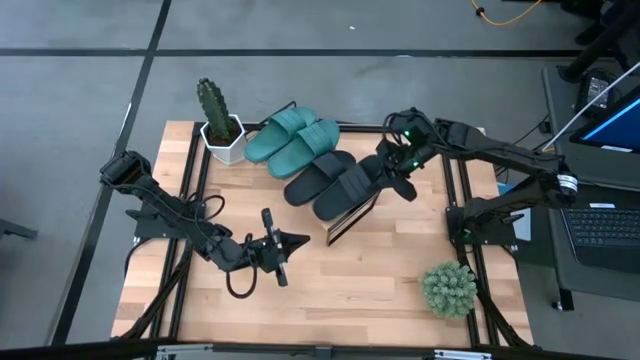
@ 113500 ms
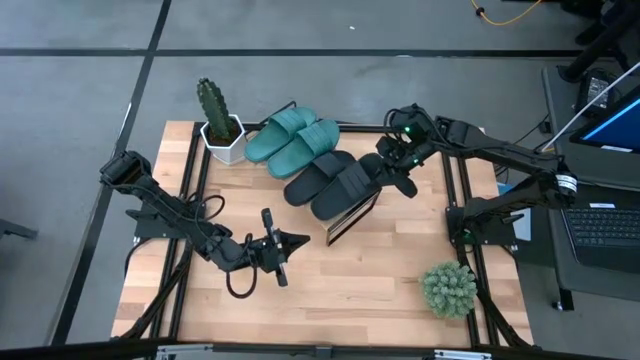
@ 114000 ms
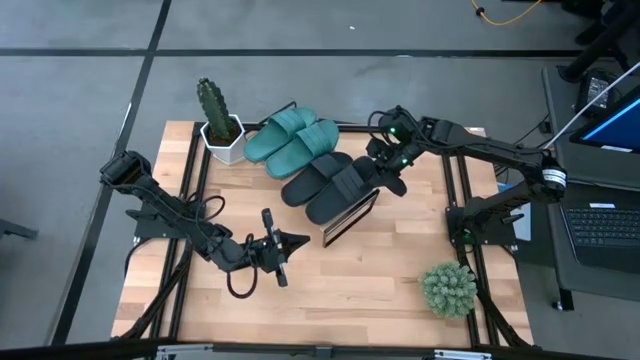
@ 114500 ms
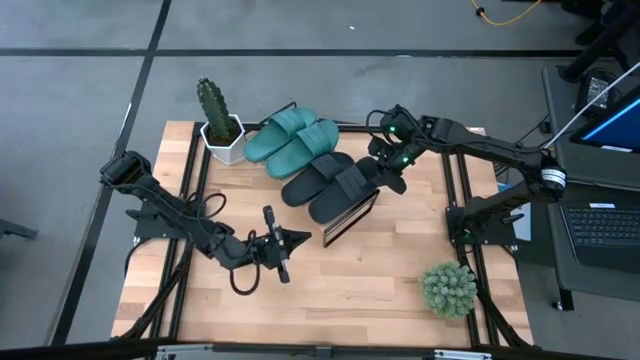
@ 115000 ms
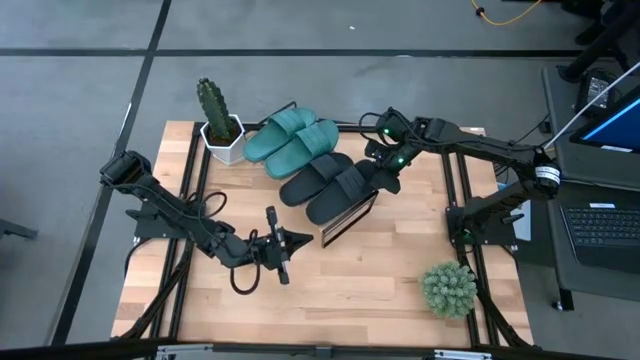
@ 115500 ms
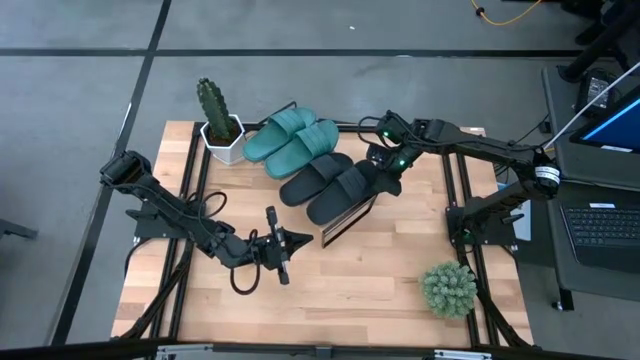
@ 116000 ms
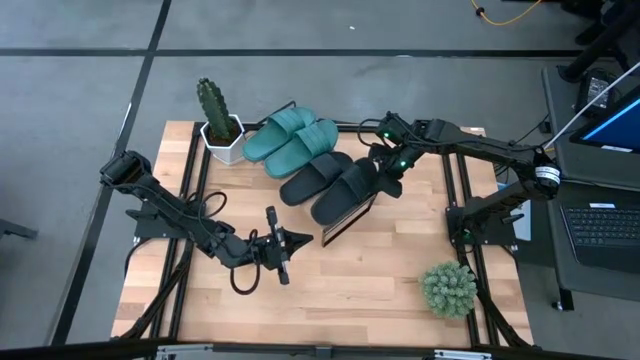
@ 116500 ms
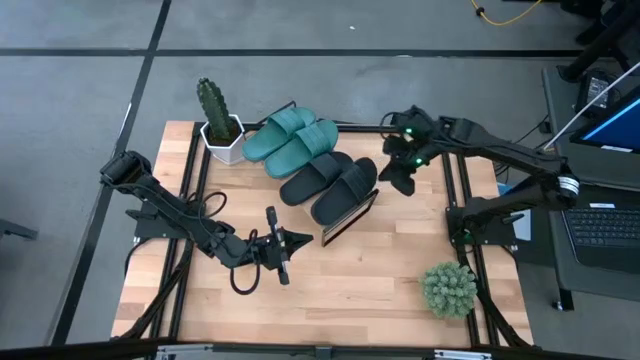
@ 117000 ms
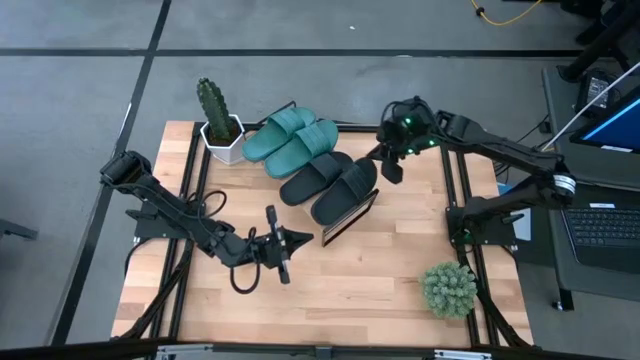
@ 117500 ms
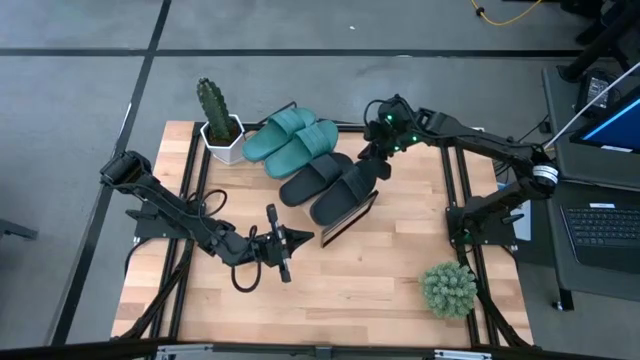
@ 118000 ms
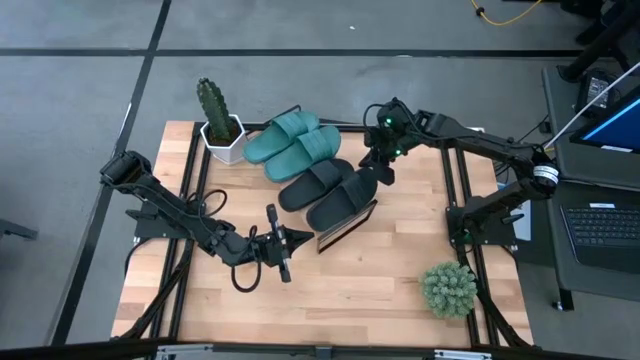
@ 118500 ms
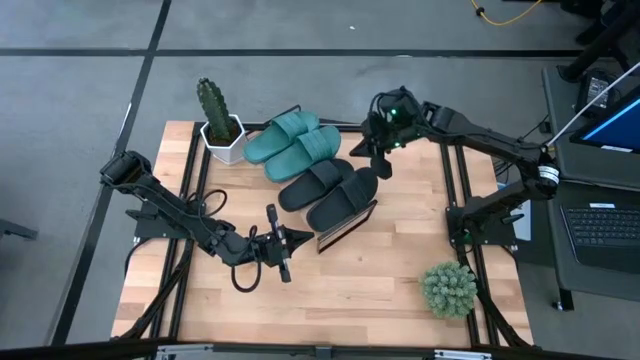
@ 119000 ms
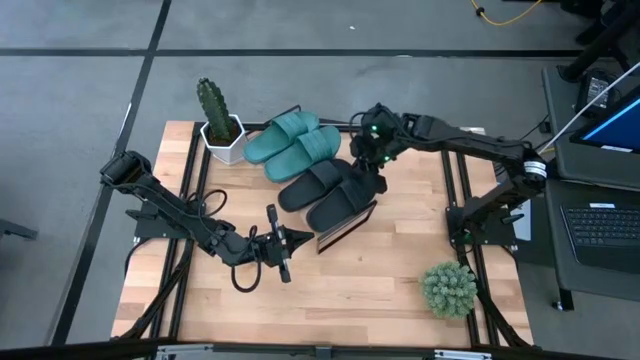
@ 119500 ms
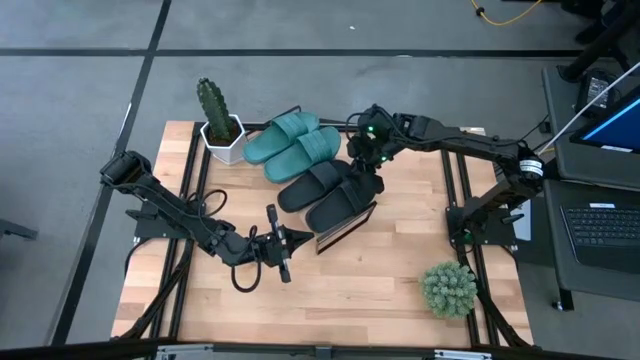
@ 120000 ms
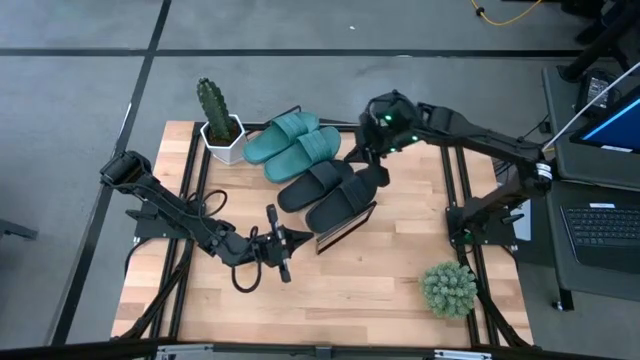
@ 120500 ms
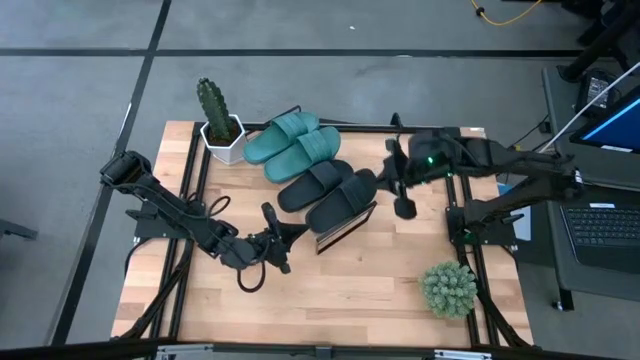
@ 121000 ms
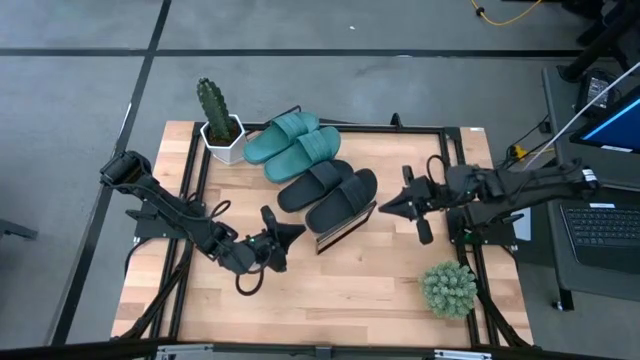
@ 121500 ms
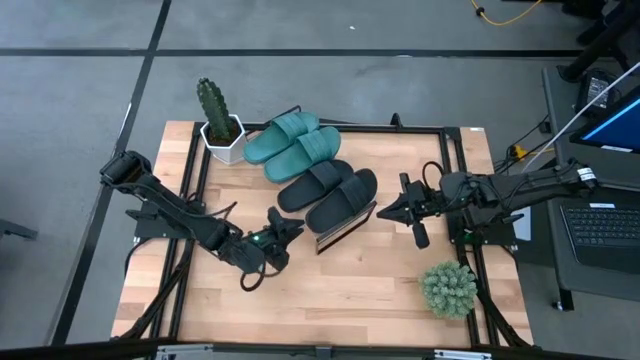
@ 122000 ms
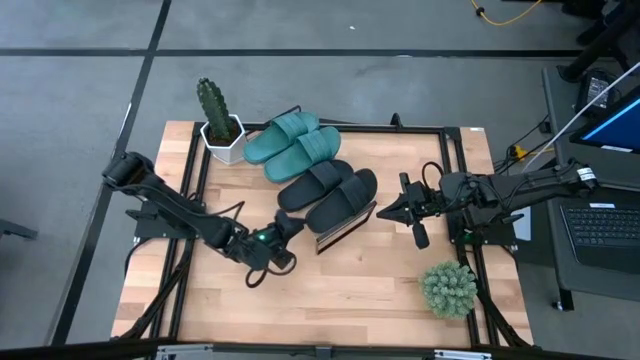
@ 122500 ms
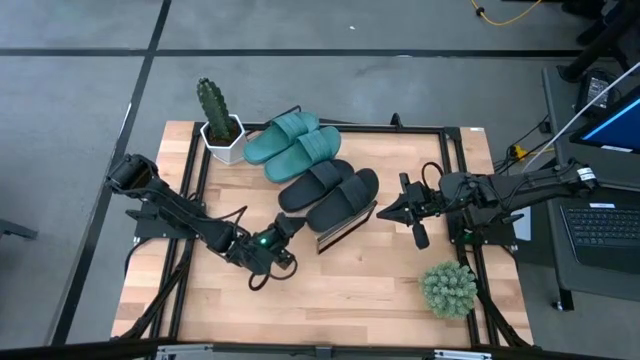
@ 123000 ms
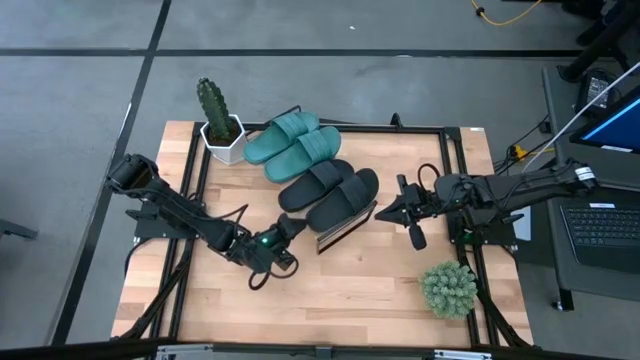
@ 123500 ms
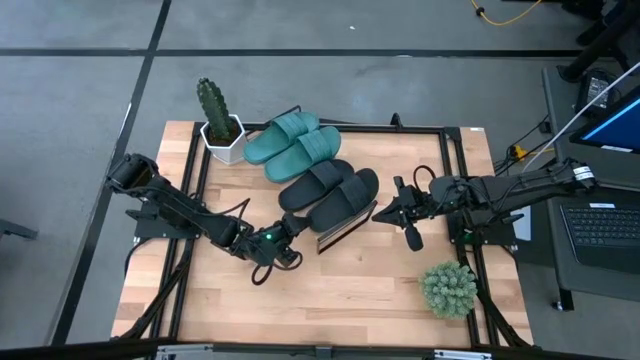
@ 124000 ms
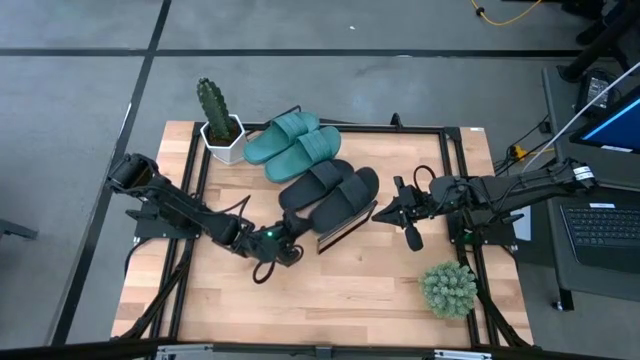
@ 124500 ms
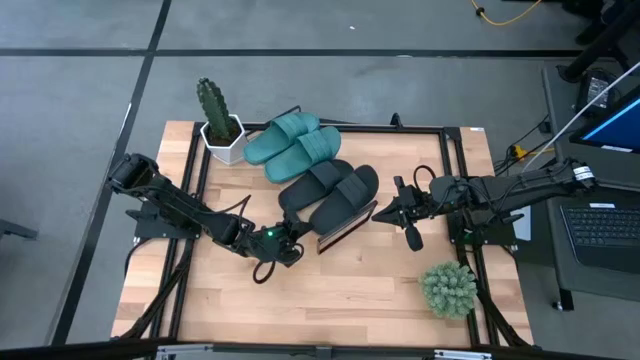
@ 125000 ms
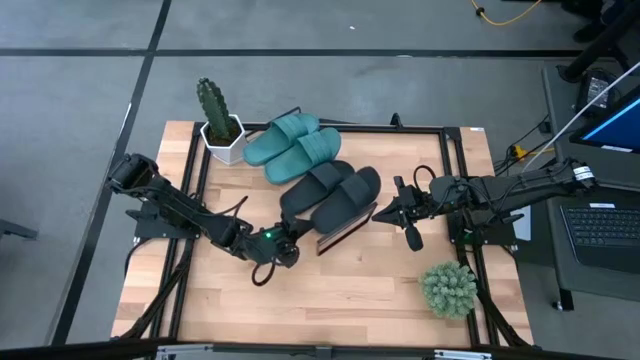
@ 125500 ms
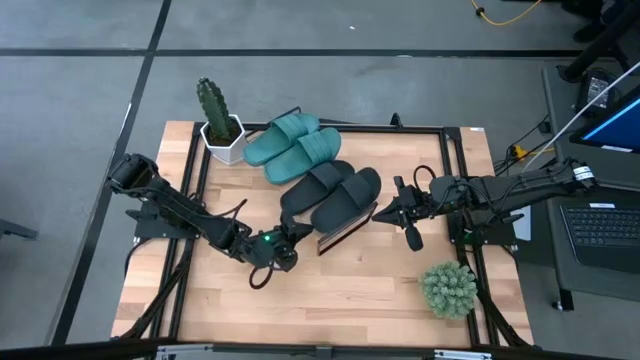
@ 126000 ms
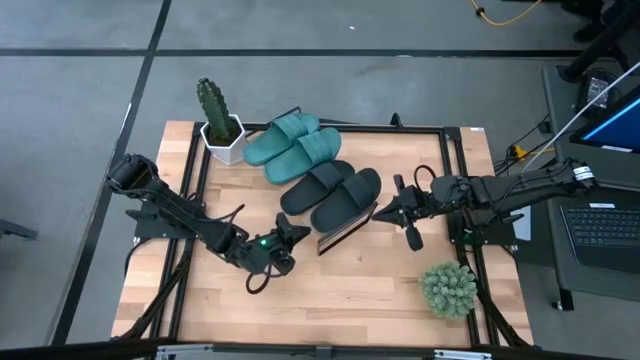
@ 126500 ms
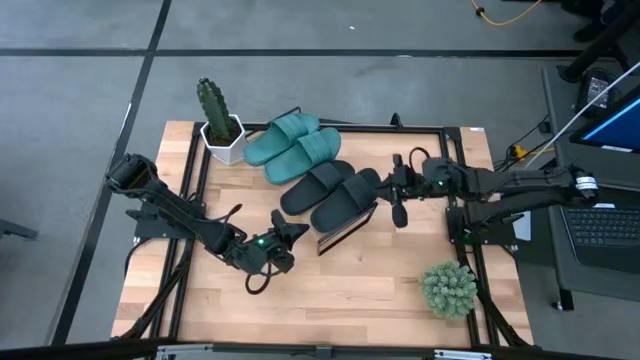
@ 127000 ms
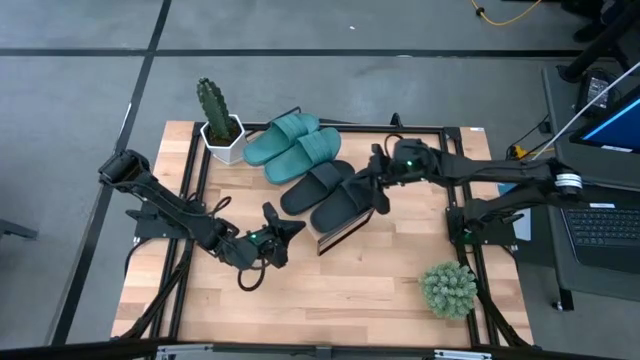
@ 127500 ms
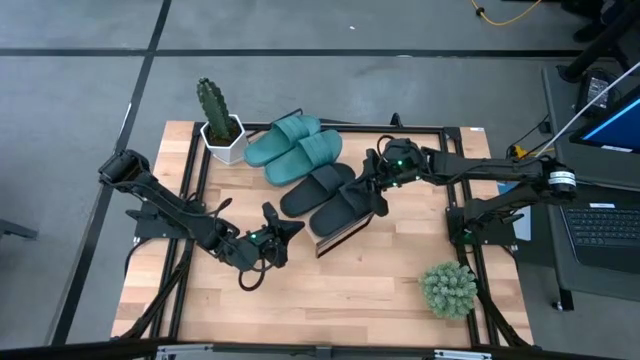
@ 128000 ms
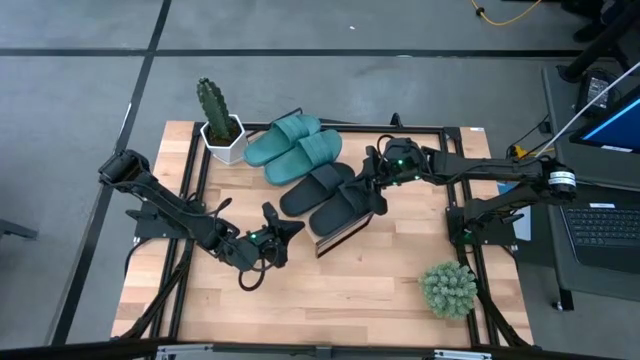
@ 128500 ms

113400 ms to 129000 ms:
Task: Pick and place slides into the shelf
Put the black slipper onto the shelf

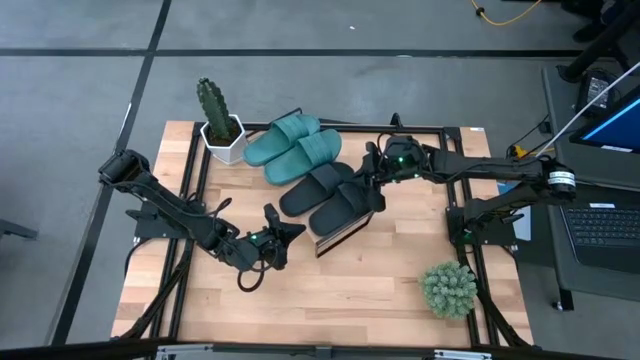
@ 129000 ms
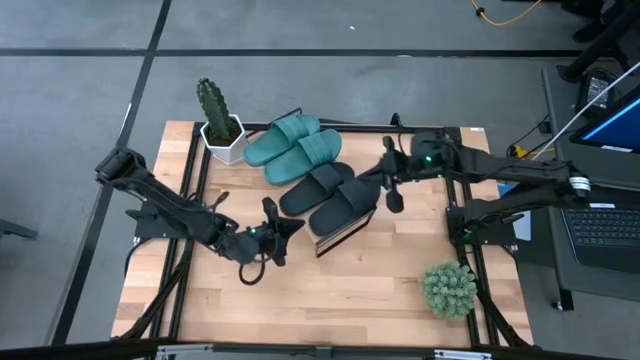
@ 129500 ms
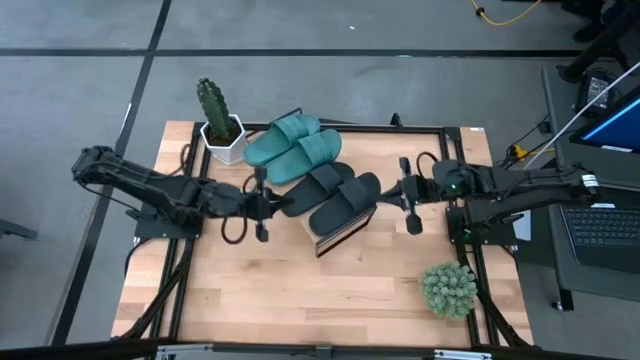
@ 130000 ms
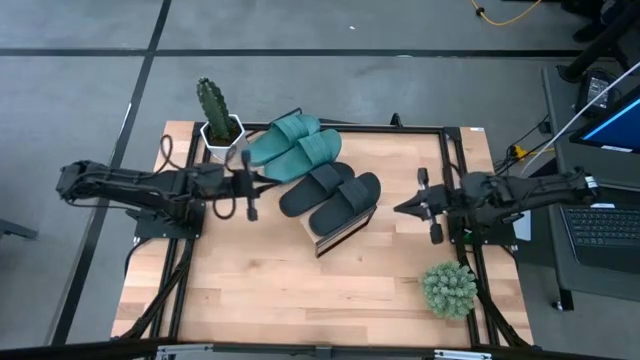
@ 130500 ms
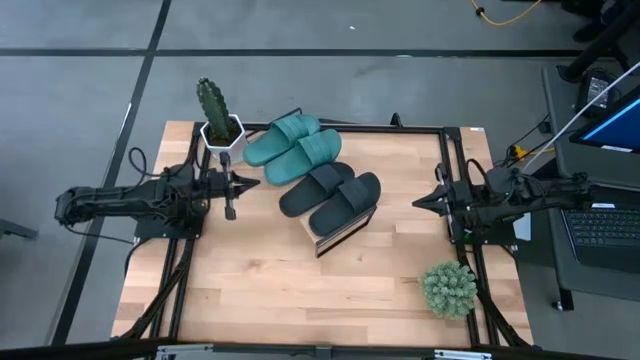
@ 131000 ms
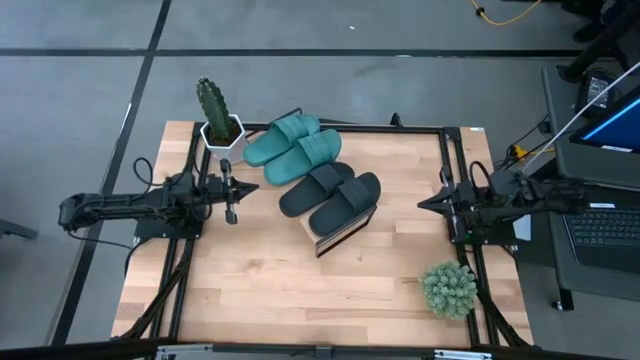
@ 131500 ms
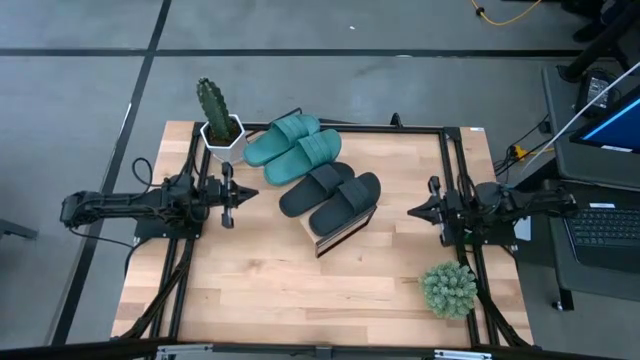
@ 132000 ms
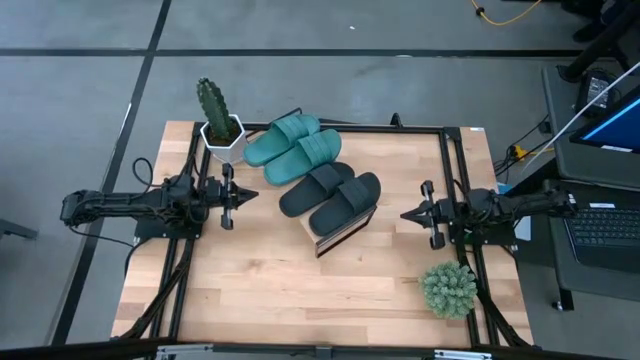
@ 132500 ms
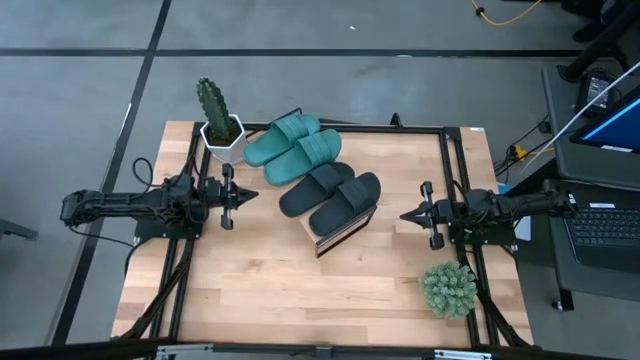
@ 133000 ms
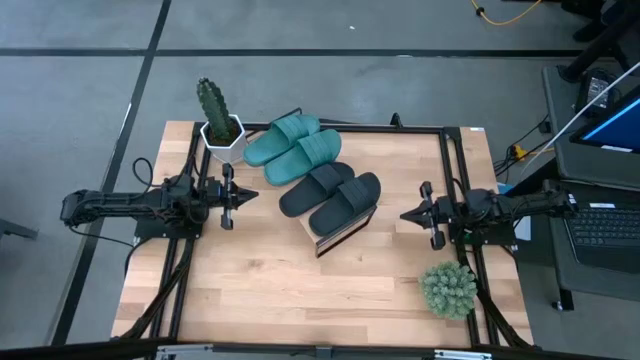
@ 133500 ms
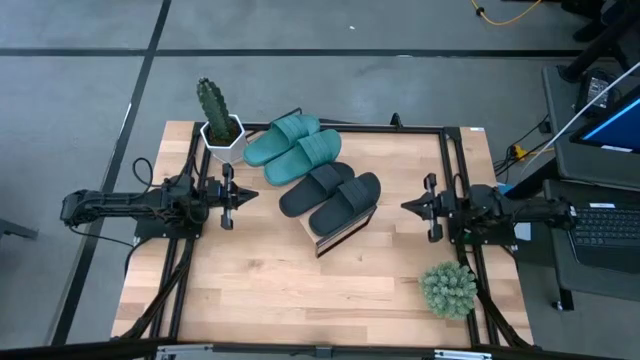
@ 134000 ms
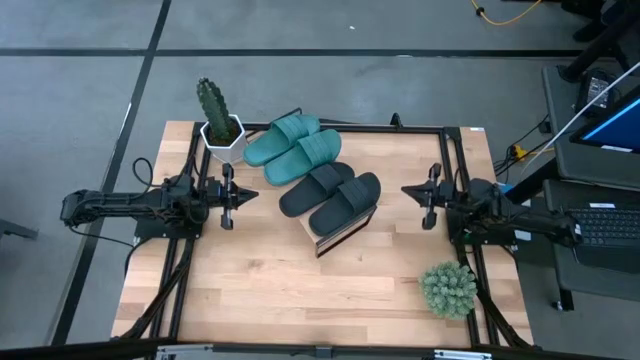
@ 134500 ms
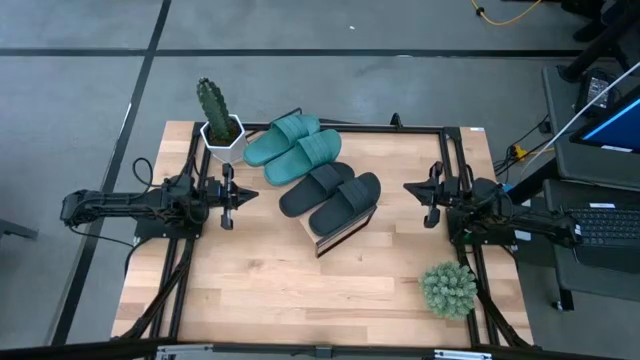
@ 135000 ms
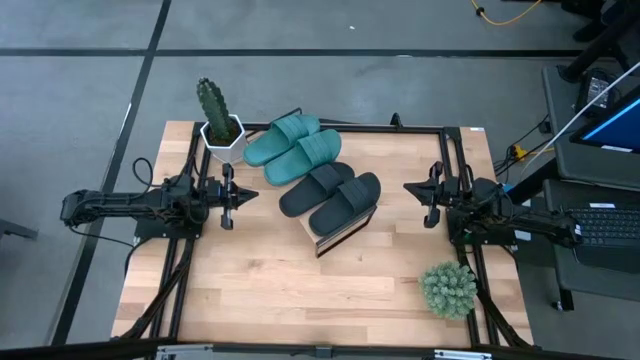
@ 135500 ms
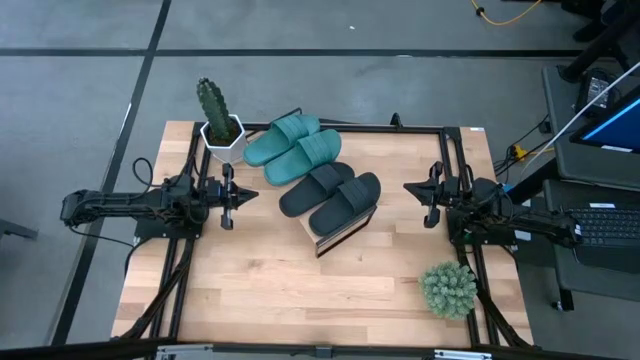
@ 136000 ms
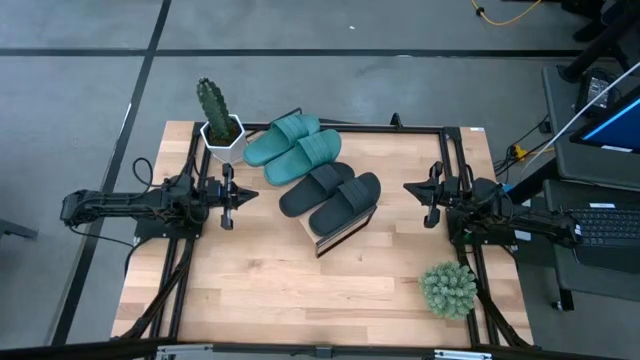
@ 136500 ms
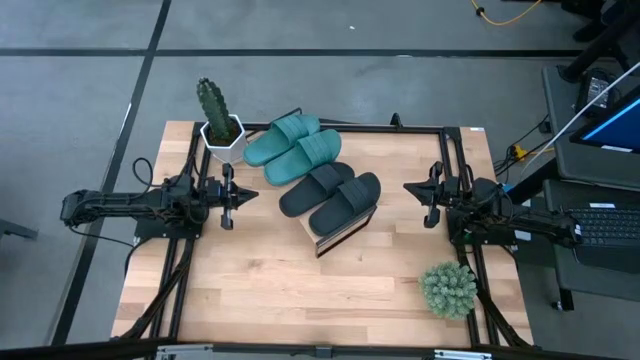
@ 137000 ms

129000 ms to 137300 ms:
Return to home position
